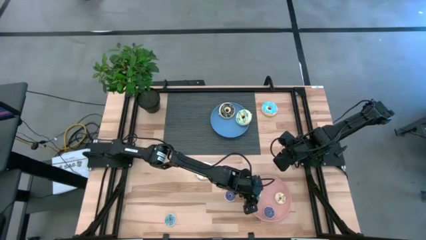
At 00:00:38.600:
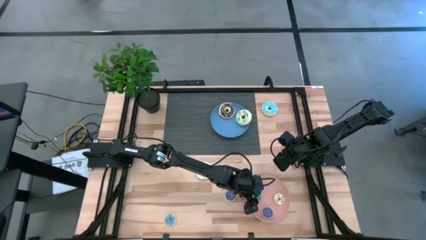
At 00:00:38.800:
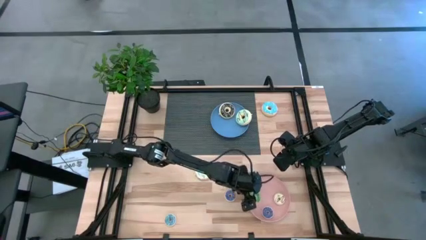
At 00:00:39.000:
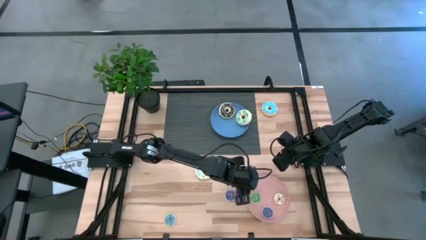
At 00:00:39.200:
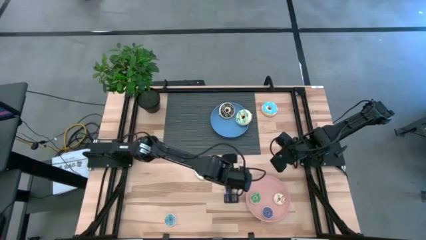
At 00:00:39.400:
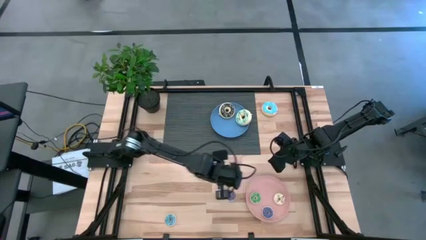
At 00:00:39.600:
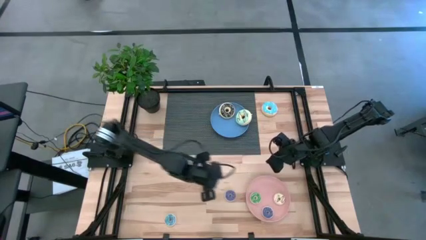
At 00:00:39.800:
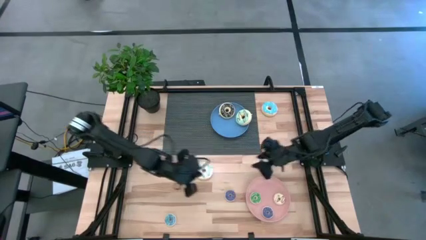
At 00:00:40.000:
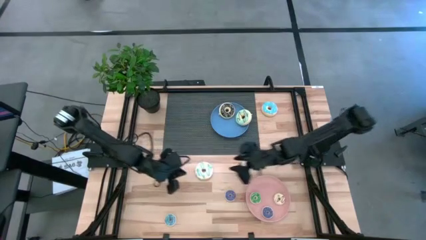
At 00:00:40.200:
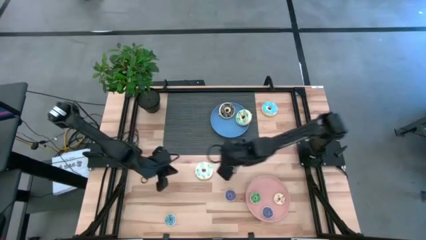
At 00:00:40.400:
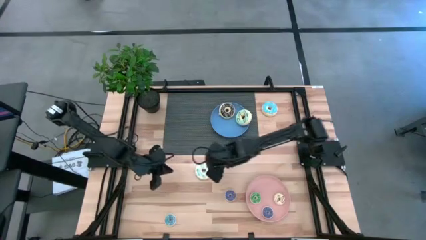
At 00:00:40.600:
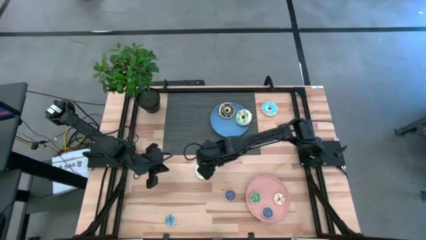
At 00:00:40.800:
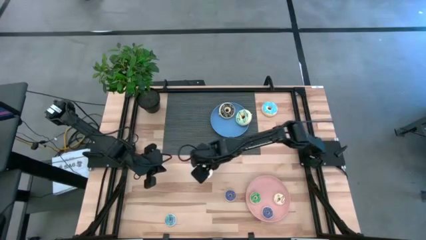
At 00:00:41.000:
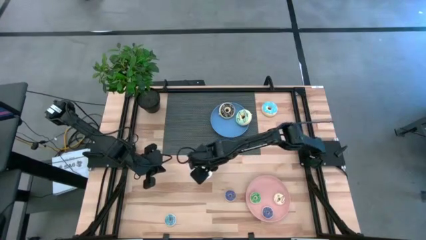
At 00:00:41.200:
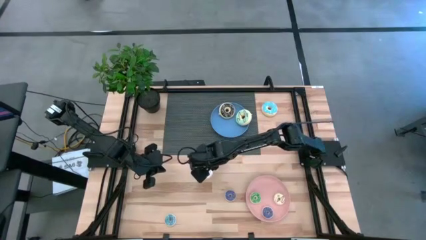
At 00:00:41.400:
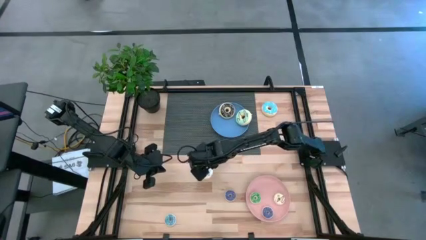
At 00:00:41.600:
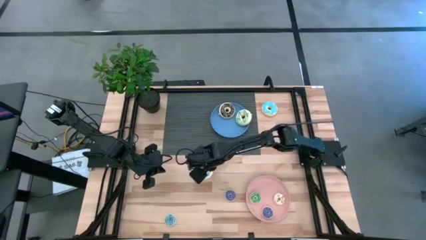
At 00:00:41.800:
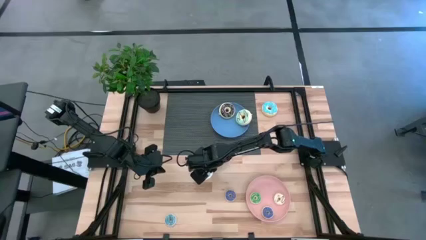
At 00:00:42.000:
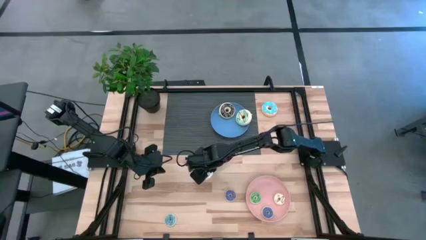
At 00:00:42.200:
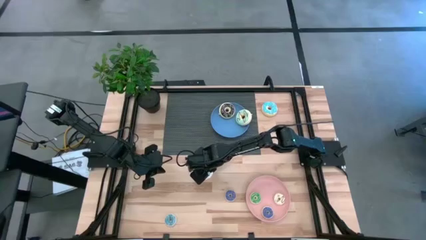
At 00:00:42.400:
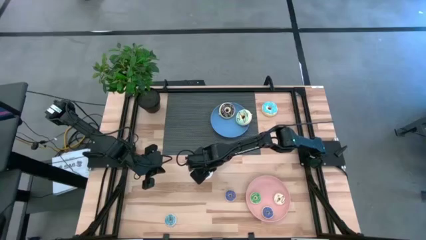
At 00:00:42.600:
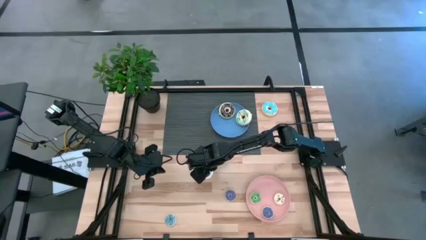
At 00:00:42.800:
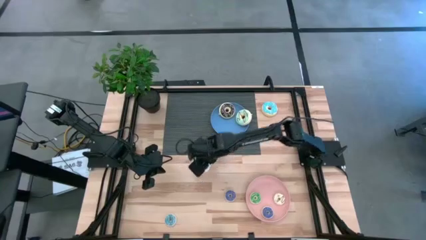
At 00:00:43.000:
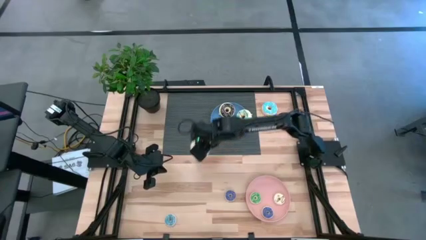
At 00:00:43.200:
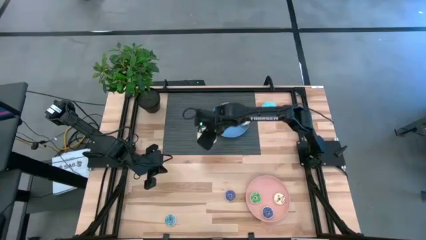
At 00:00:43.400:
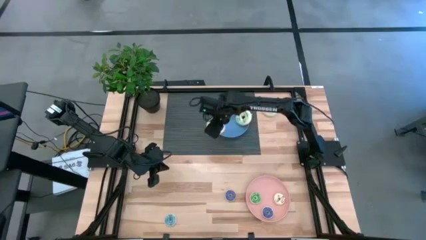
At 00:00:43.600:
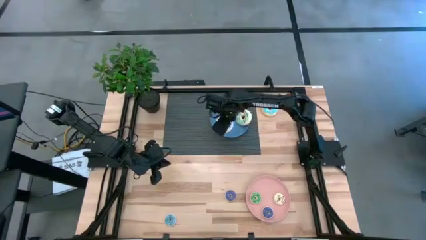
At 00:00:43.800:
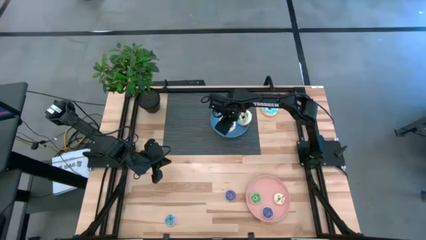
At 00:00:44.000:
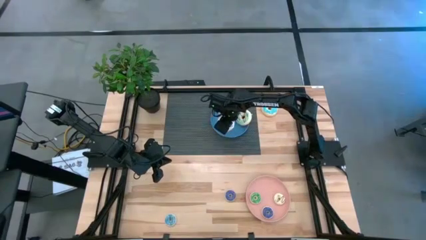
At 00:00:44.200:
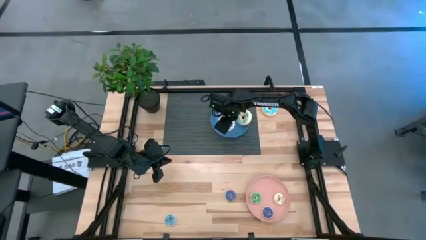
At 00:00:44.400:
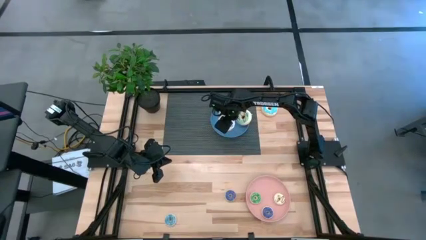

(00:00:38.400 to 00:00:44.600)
Task: Pick & Place donuts
Put the large white donut on the blue plate

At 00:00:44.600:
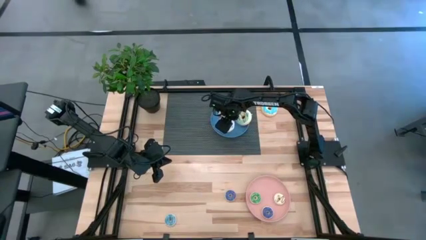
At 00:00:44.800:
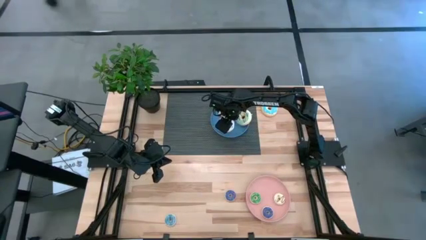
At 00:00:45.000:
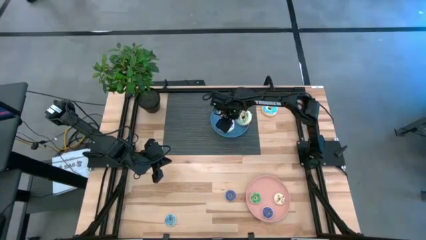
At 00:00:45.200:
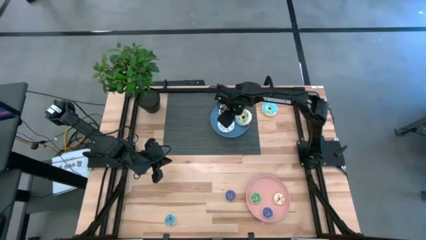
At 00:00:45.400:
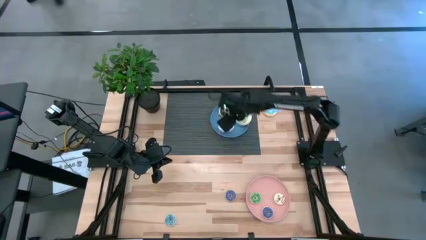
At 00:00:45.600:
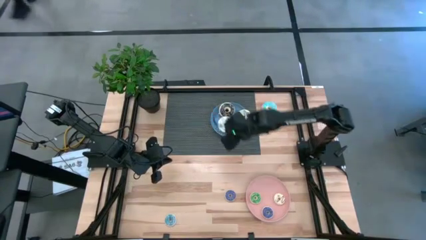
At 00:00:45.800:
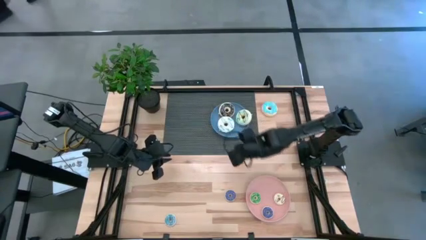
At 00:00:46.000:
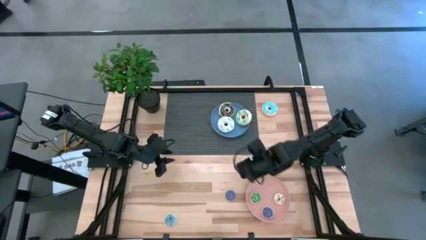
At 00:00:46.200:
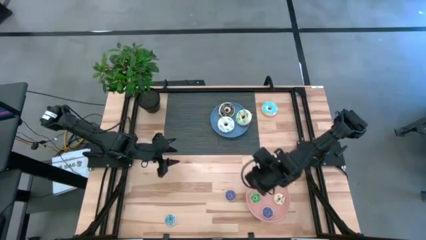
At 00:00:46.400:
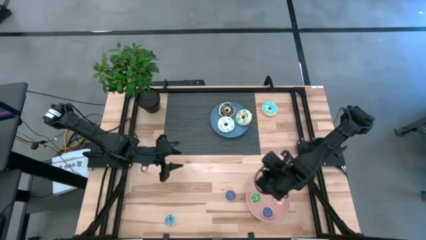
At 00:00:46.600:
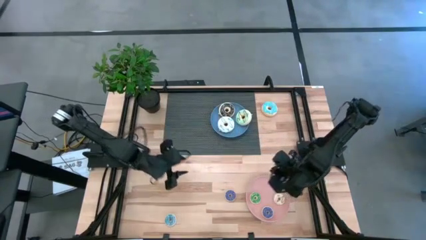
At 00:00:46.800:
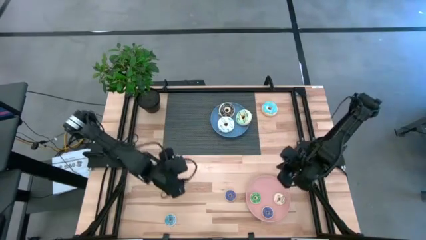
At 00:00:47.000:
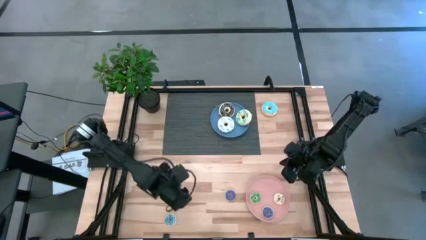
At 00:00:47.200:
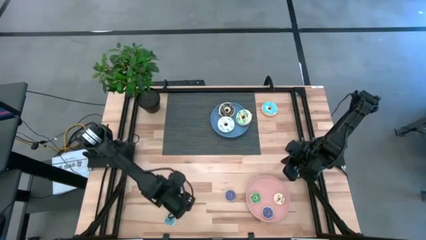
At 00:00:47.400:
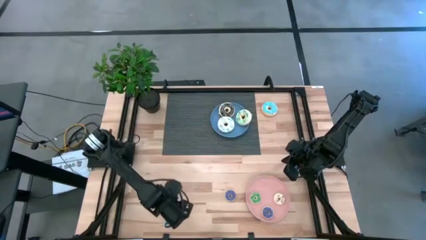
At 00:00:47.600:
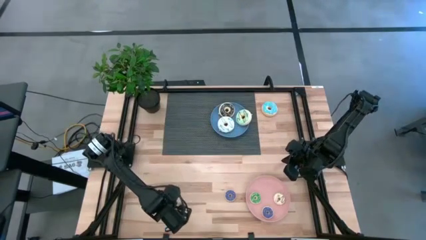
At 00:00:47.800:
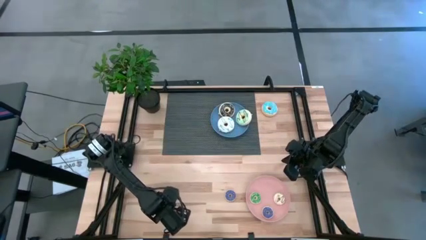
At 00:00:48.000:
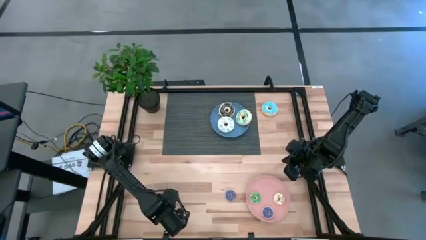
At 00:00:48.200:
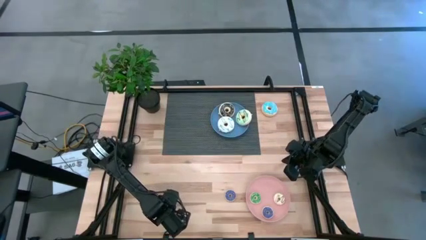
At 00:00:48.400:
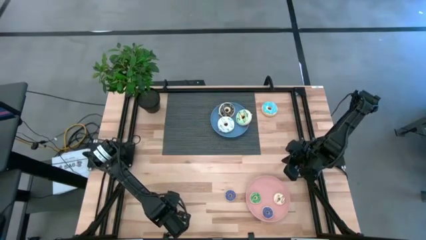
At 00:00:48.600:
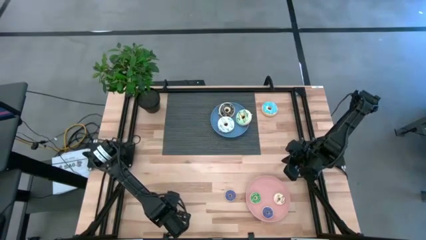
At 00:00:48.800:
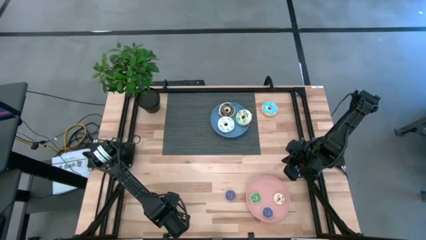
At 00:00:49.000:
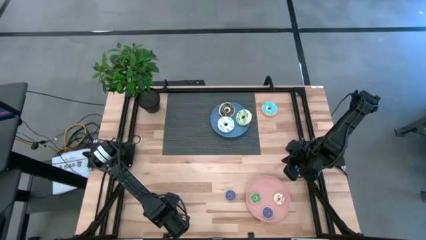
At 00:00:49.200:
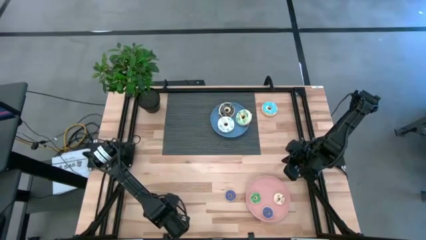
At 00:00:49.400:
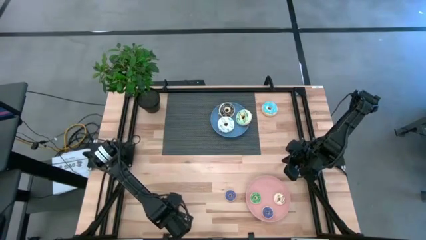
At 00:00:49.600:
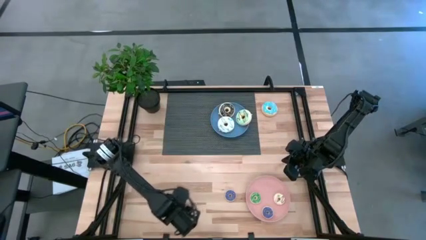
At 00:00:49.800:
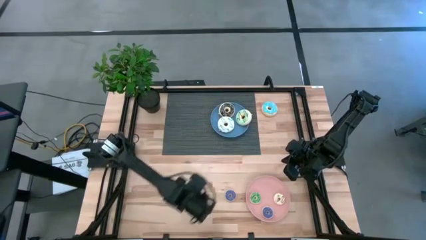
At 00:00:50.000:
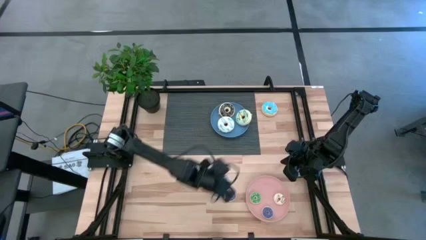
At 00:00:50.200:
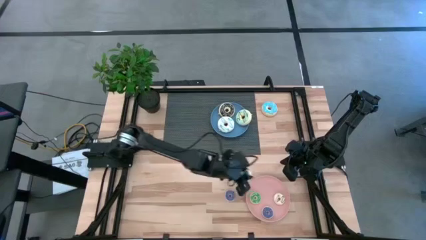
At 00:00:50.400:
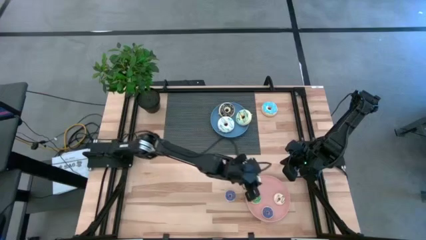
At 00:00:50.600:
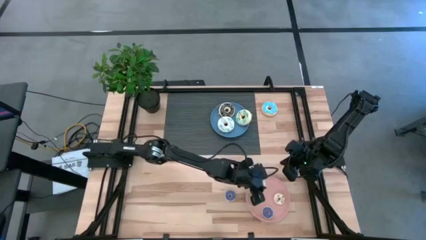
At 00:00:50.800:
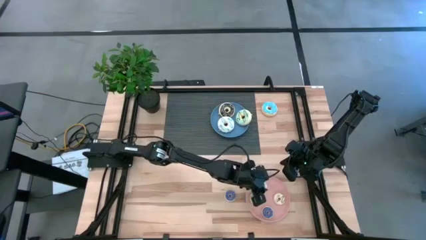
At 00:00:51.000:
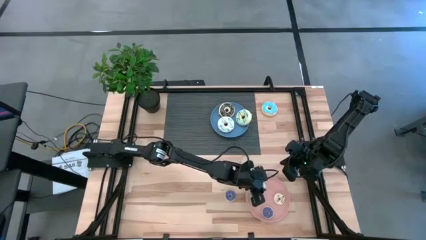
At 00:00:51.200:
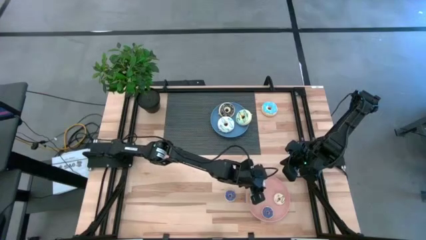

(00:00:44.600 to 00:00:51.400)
Put the small blue donut on the pink plate

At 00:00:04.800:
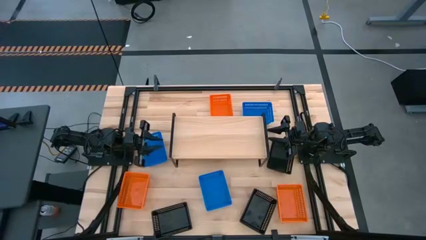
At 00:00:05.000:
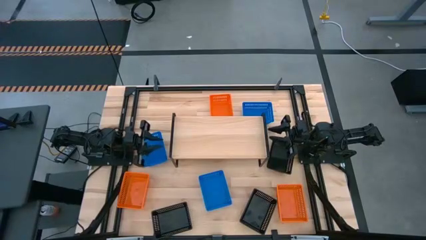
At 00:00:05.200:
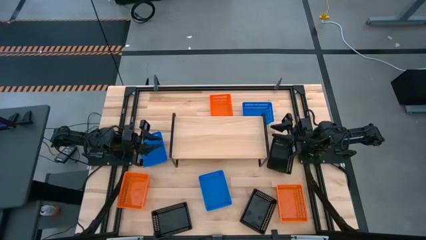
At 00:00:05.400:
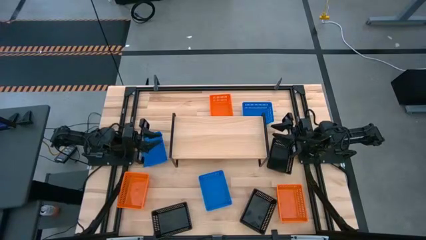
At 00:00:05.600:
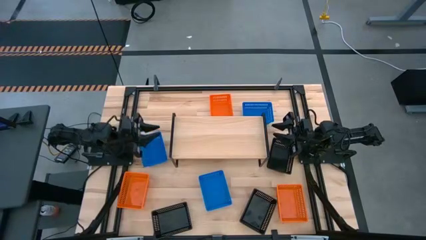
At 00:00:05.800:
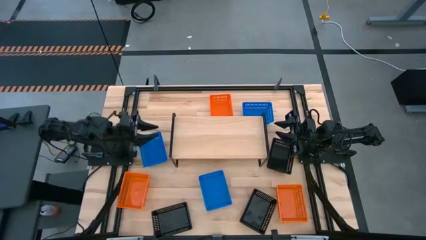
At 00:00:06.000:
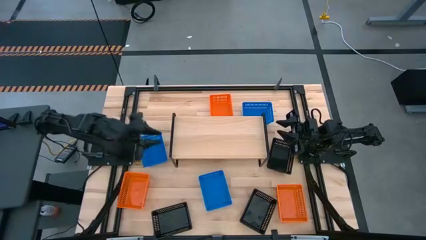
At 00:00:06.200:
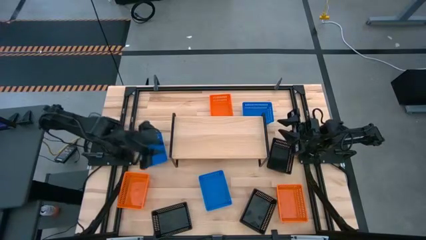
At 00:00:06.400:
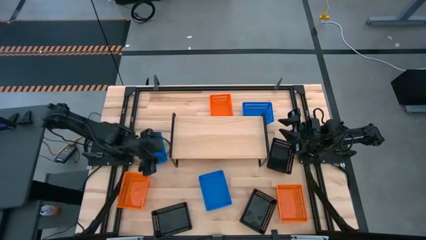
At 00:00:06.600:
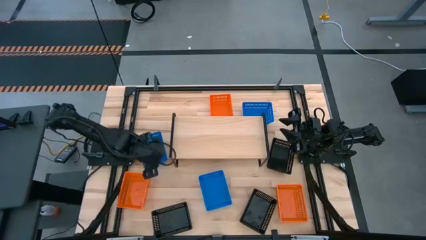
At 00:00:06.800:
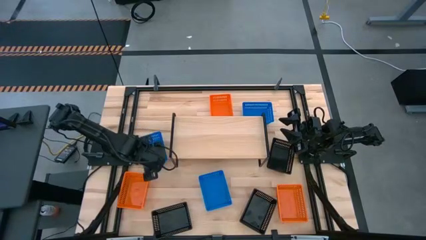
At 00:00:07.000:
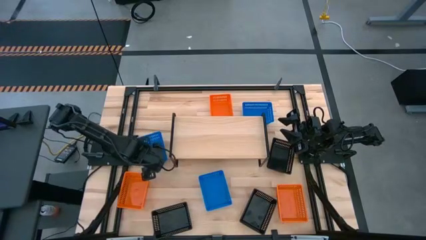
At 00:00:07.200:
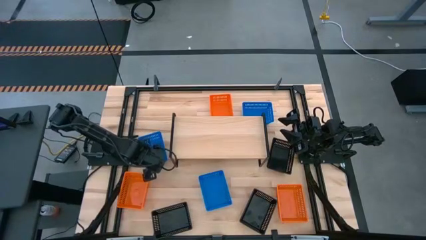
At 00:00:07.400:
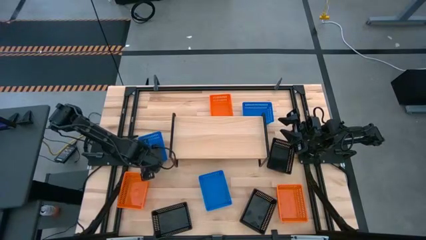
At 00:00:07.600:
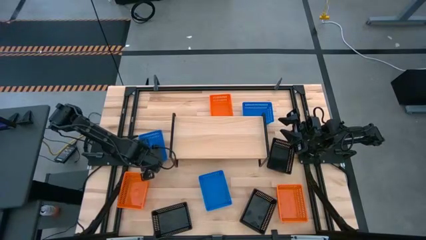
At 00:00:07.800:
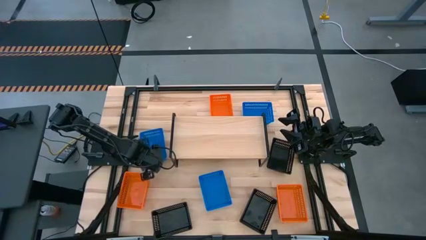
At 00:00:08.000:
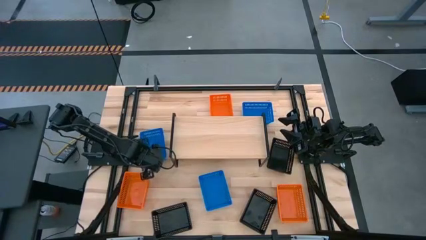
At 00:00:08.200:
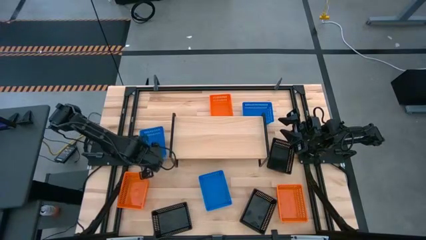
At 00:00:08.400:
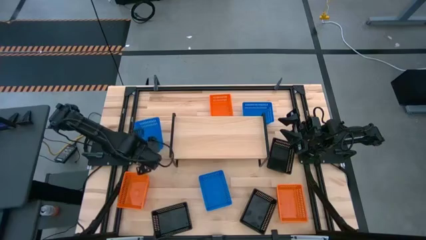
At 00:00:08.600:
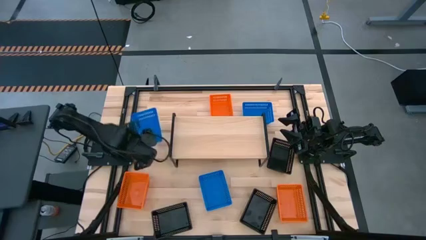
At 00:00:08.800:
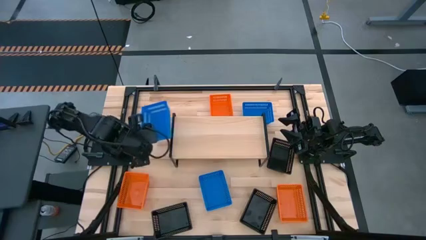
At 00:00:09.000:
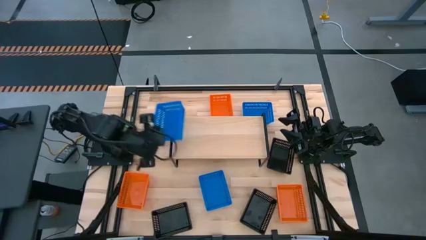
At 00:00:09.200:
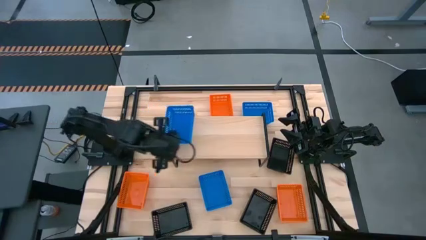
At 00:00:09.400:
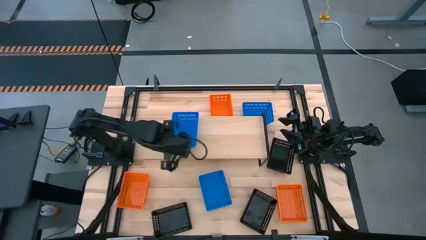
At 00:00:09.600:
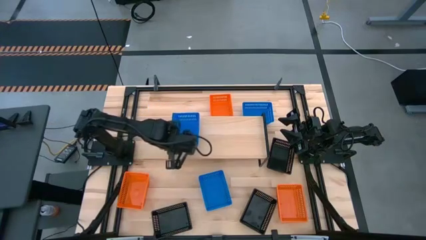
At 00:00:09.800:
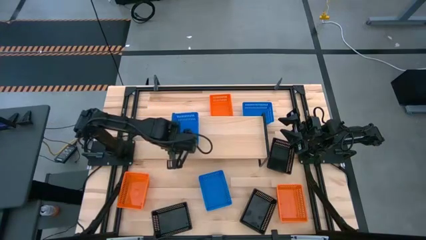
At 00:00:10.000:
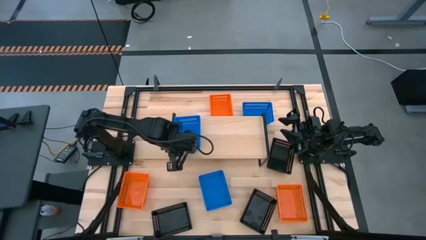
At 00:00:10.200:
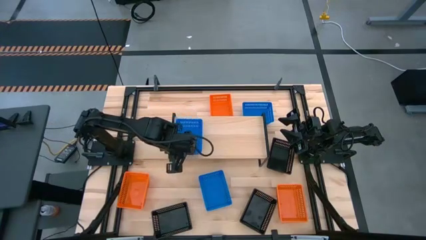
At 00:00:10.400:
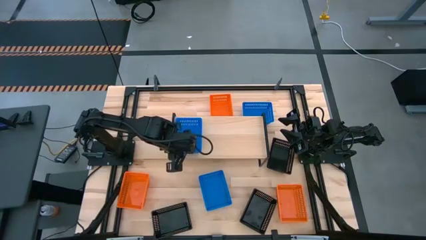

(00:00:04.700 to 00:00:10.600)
Task: Stack baskets on shelf by color
Put the middle left blue basket on the shelf
